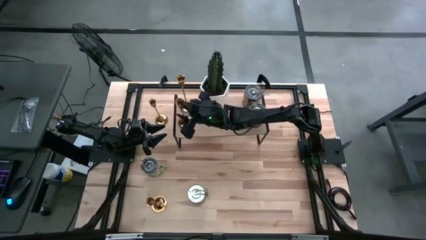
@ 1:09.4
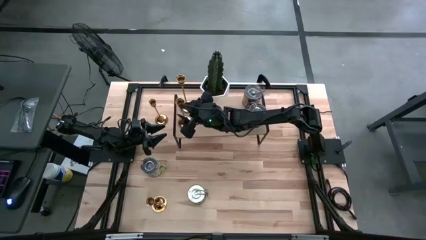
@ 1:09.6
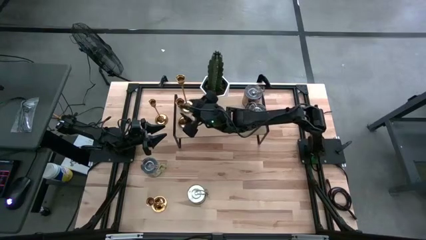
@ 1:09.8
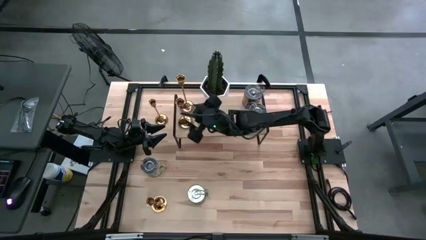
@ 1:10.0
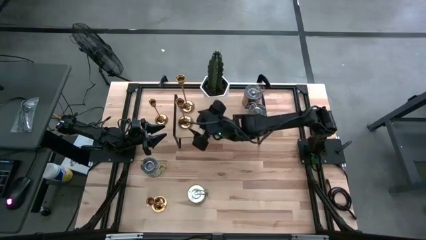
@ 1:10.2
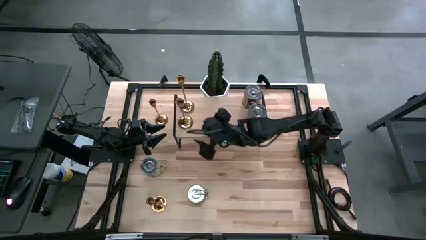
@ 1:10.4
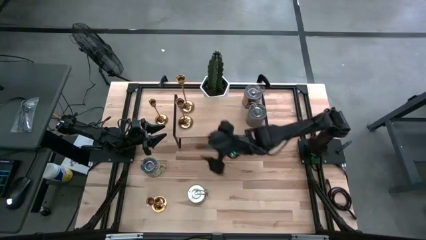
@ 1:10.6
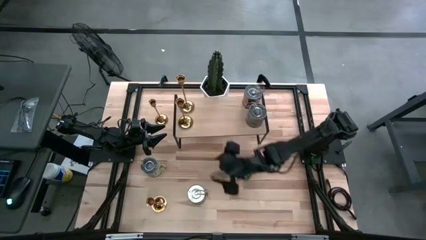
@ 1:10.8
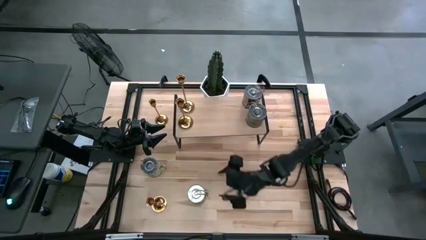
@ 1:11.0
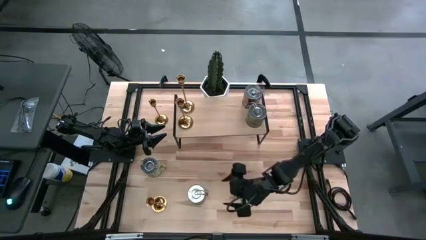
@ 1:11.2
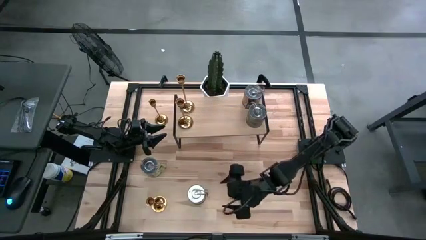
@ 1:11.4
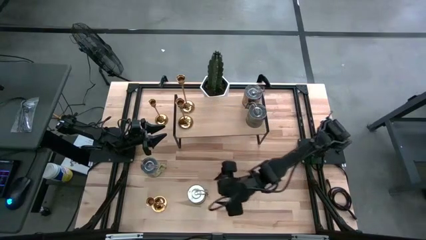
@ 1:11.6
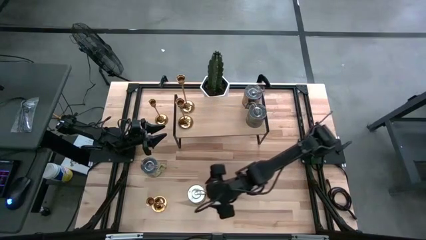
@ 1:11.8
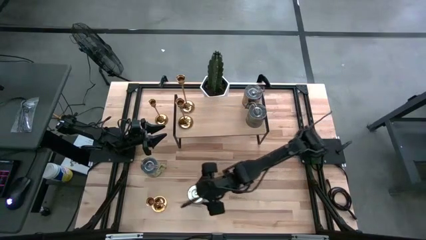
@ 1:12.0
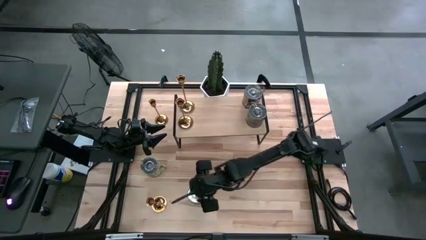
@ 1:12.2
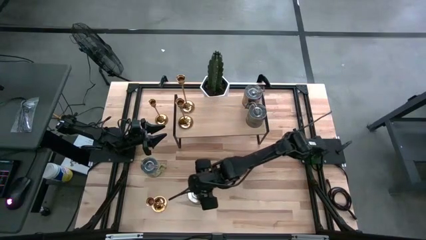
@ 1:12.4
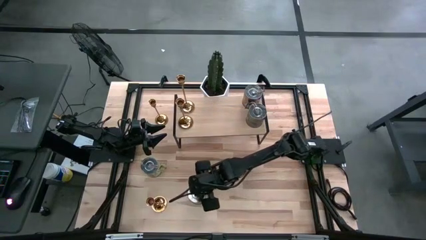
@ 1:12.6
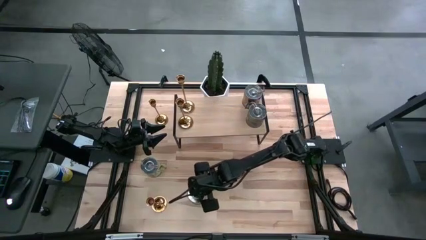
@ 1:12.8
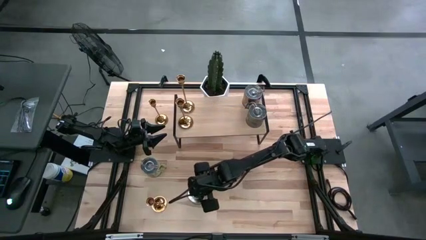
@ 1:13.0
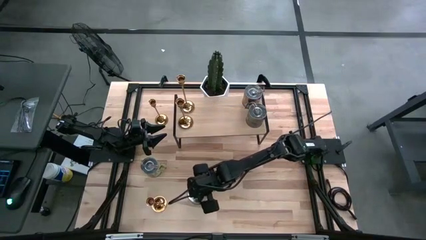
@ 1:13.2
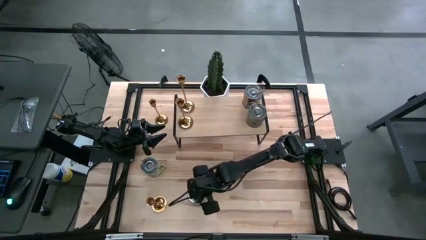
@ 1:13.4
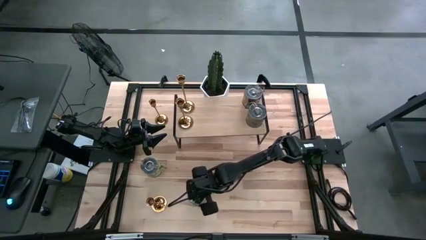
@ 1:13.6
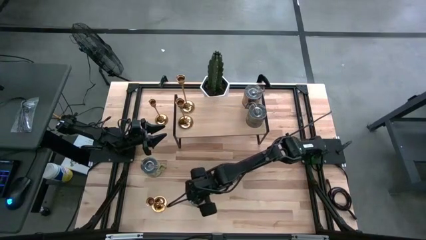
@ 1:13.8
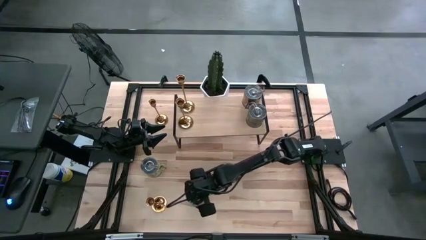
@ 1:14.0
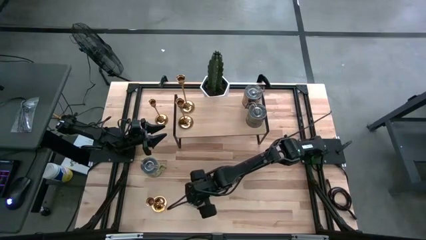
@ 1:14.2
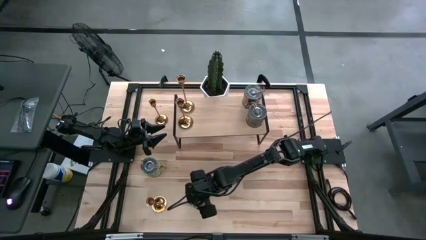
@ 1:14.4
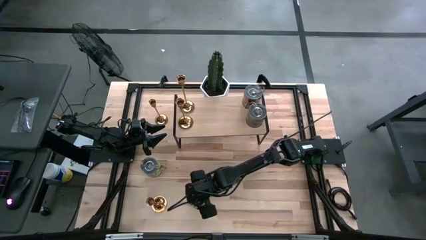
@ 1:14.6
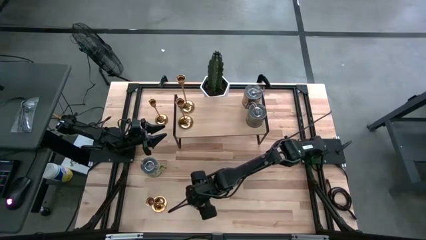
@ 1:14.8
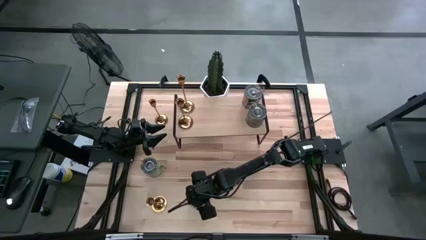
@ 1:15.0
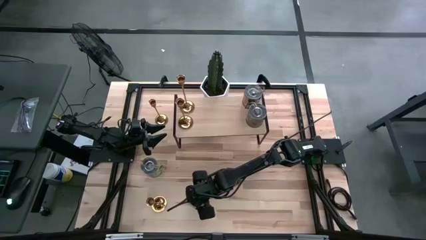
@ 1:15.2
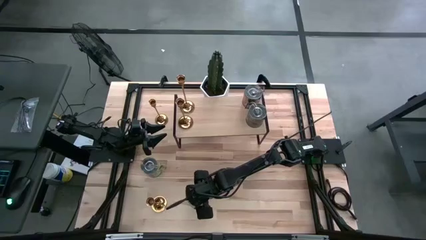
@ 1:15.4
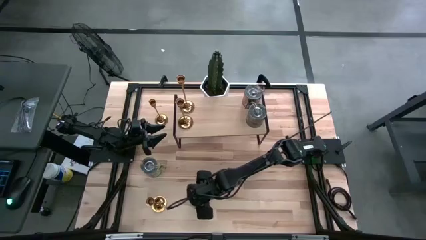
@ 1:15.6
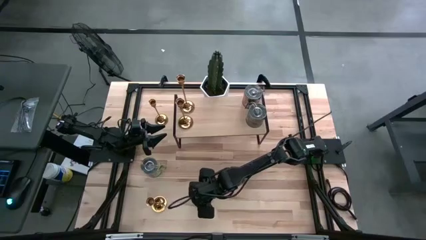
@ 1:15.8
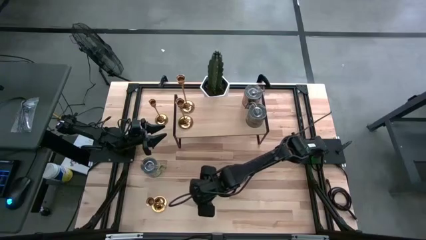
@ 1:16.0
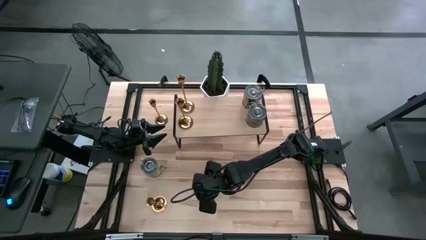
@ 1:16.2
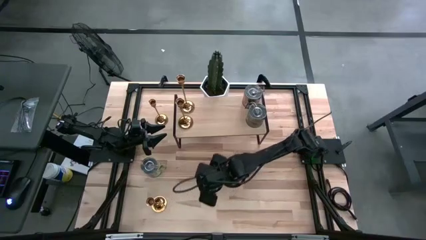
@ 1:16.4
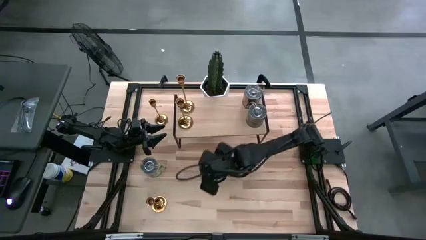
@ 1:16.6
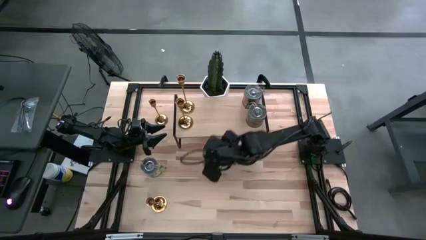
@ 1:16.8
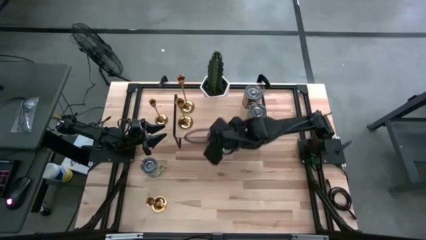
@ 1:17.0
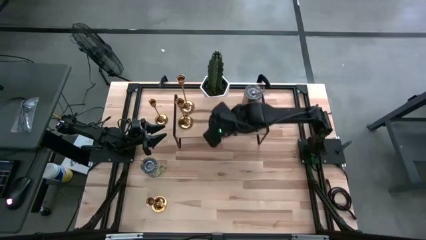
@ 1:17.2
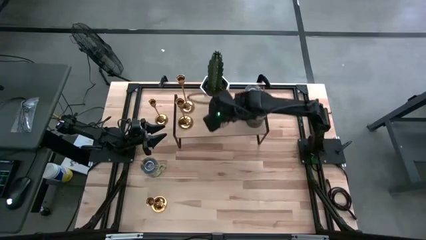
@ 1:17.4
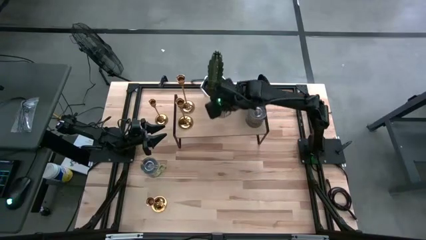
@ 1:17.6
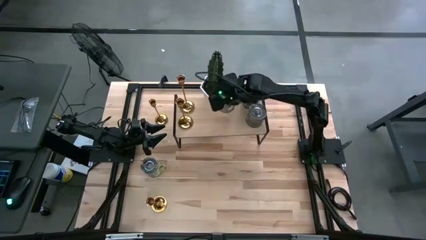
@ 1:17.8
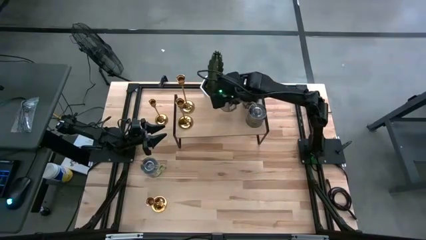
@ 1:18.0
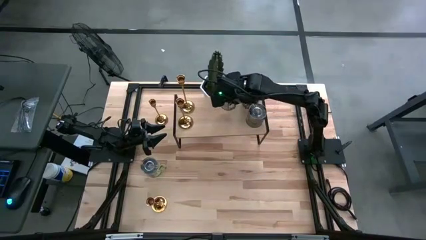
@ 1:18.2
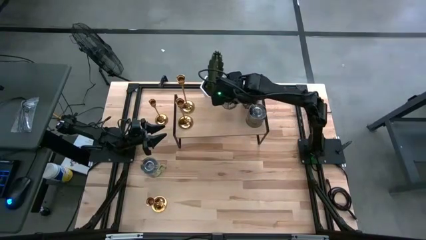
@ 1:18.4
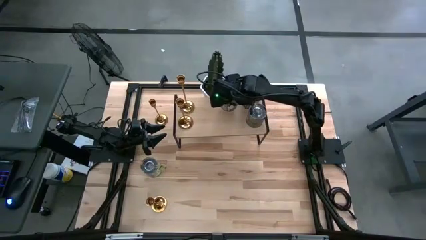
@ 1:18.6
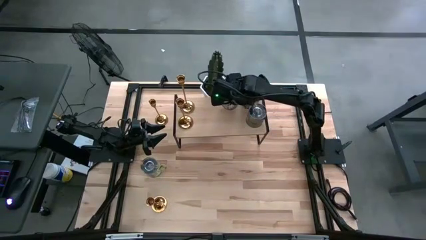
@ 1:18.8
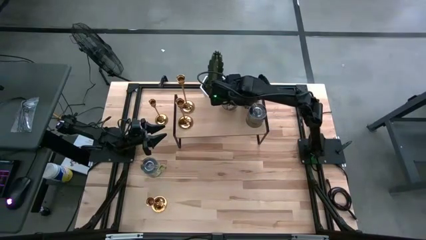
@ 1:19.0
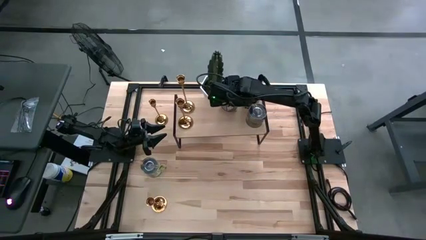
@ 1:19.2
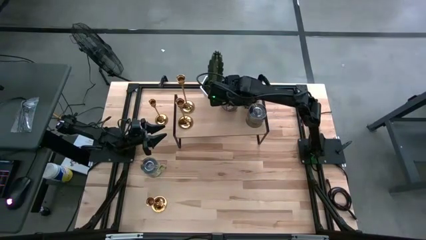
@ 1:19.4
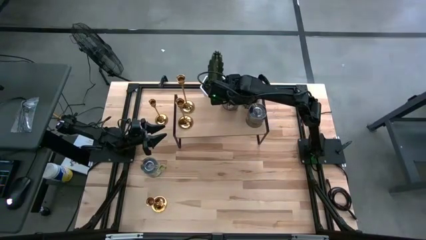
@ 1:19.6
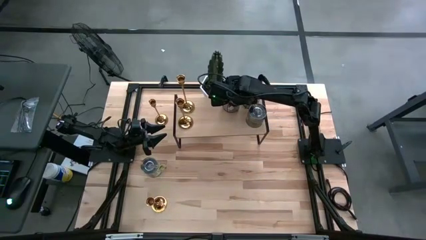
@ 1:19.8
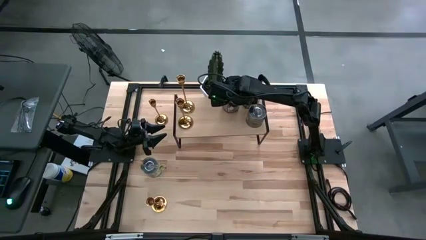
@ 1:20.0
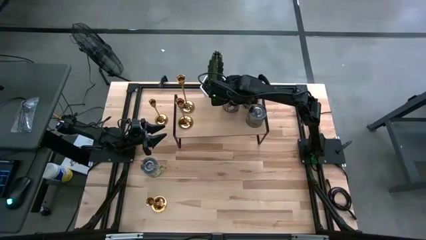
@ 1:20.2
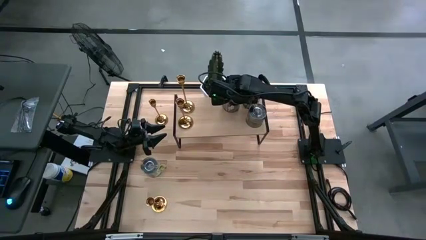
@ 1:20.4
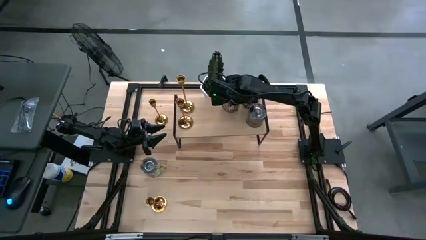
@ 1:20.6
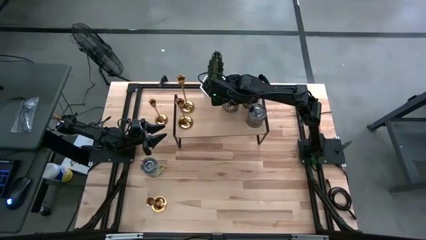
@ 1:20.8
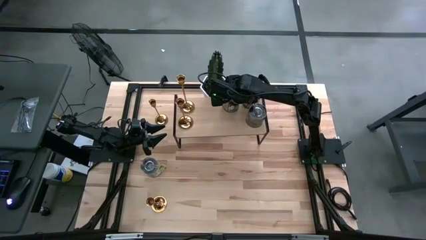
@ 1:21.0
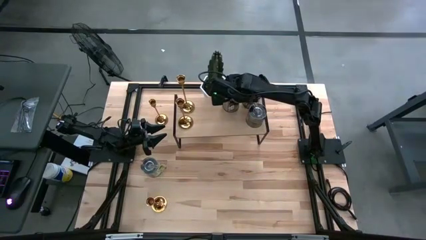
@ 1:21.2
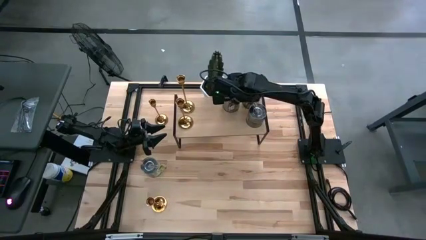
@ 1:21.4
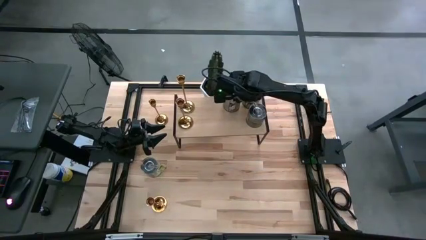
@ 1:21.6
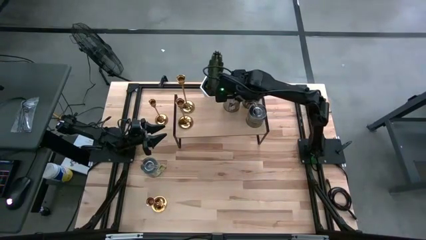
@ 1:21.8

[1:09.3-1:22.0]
Task: Pick & Place candle stick holders
Put the silver scented candle can on the shelf
